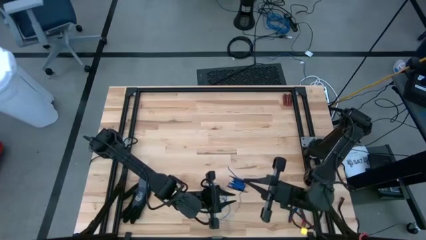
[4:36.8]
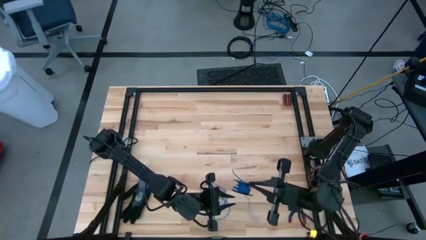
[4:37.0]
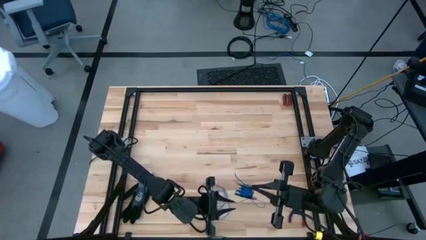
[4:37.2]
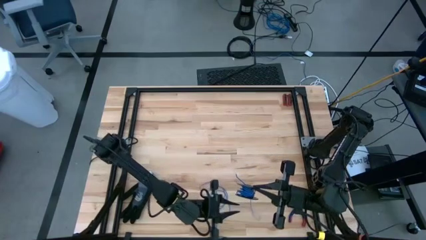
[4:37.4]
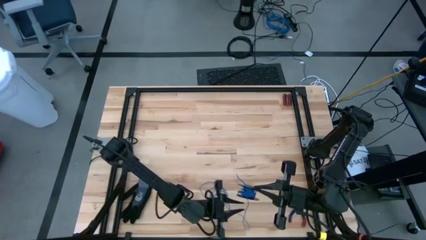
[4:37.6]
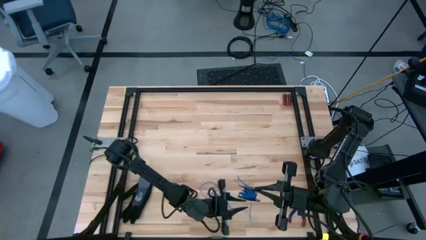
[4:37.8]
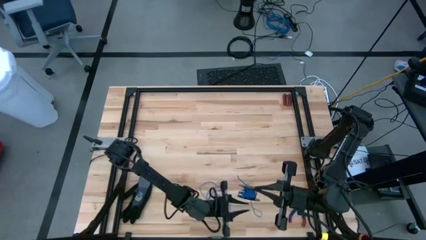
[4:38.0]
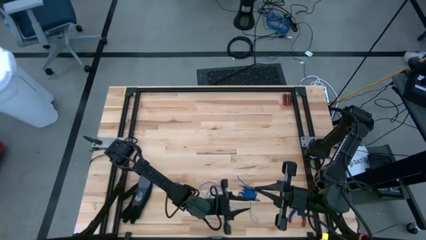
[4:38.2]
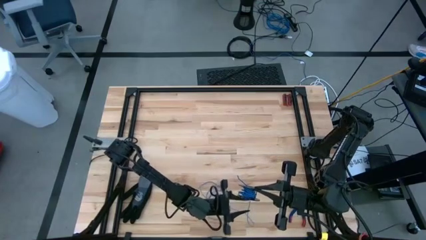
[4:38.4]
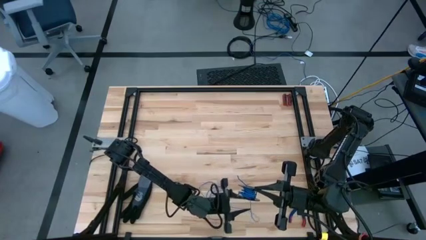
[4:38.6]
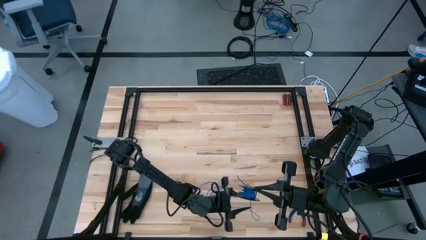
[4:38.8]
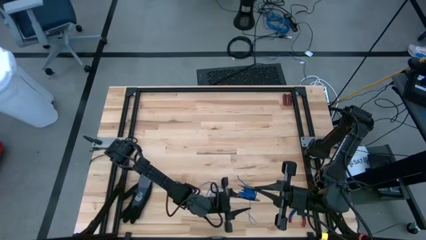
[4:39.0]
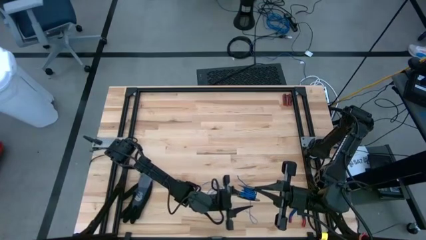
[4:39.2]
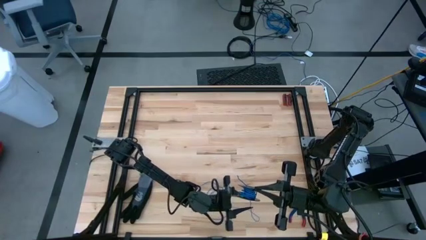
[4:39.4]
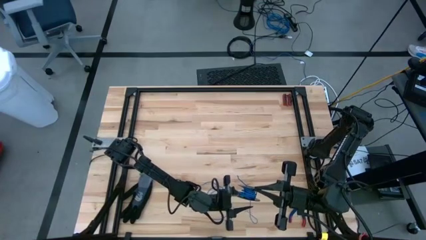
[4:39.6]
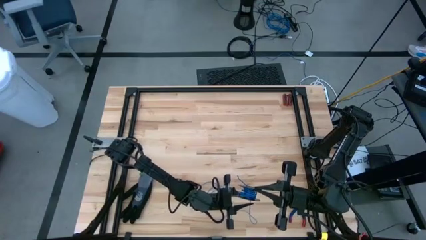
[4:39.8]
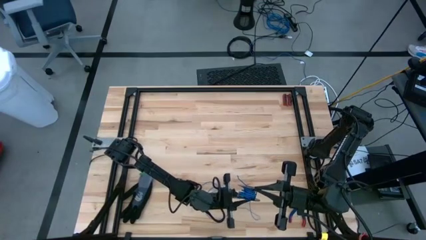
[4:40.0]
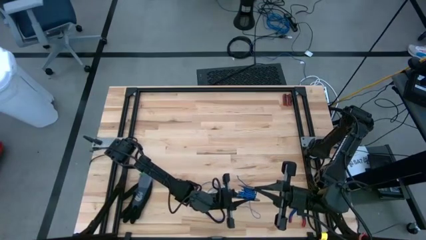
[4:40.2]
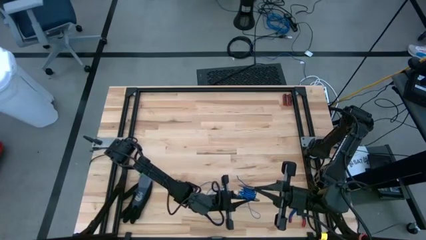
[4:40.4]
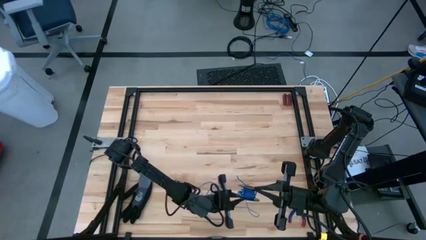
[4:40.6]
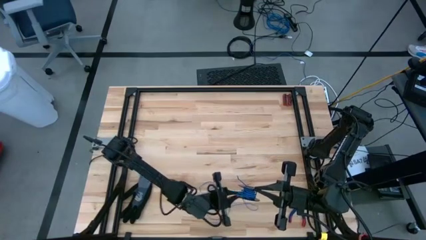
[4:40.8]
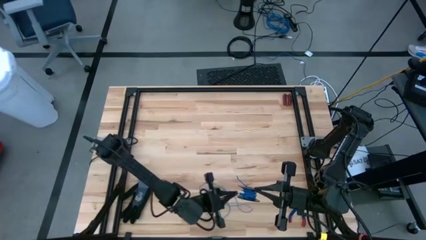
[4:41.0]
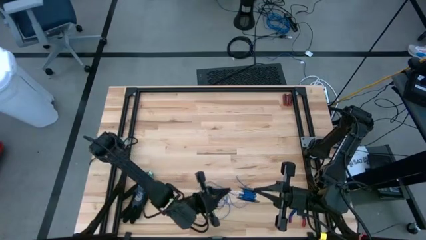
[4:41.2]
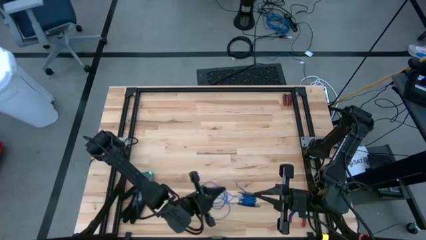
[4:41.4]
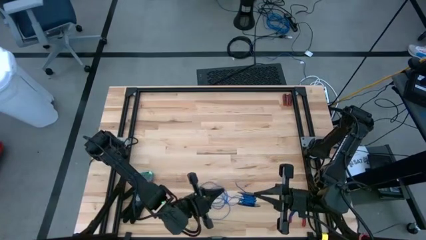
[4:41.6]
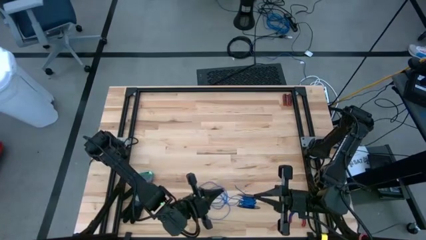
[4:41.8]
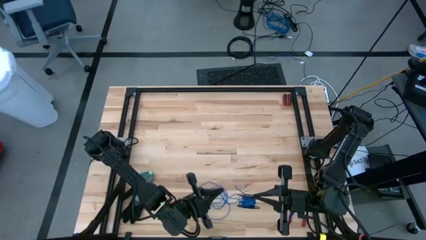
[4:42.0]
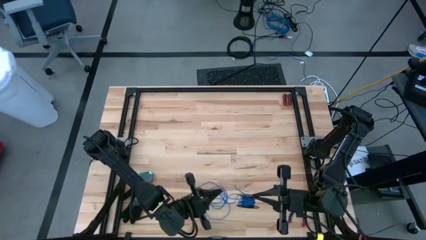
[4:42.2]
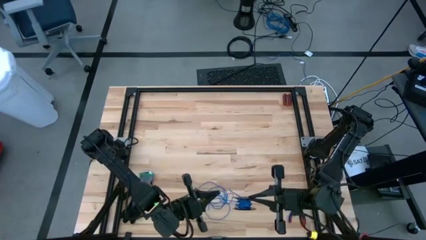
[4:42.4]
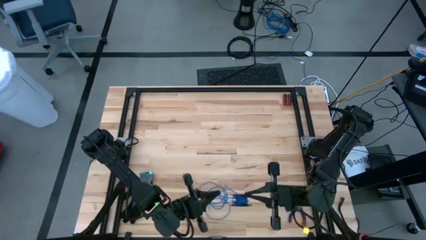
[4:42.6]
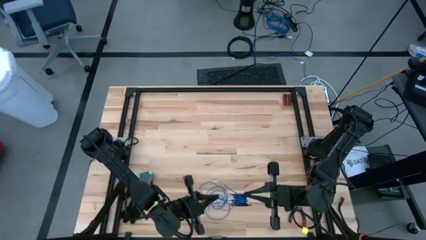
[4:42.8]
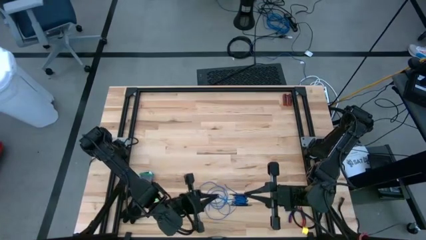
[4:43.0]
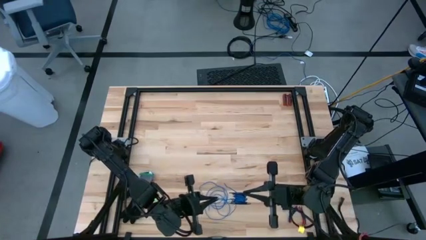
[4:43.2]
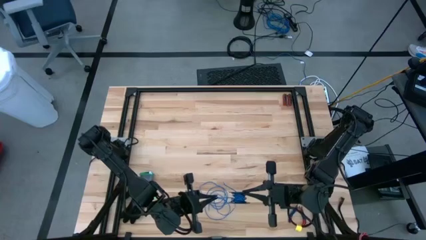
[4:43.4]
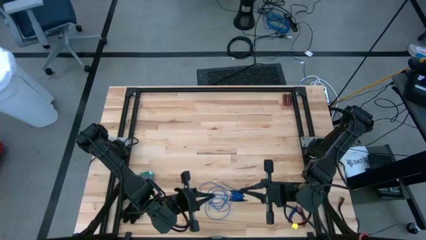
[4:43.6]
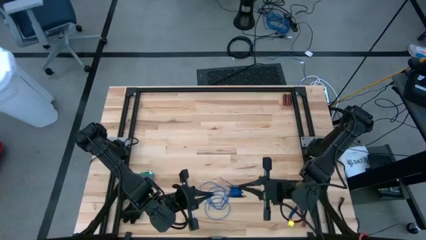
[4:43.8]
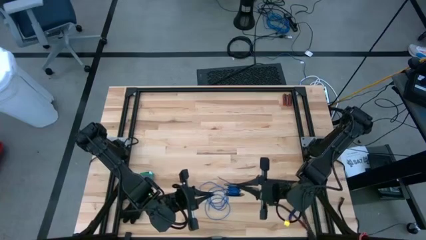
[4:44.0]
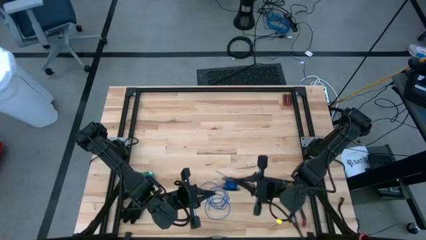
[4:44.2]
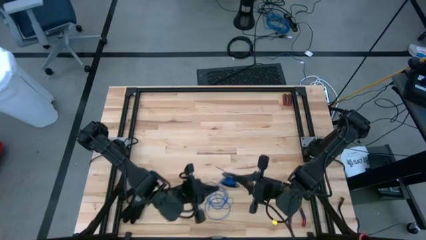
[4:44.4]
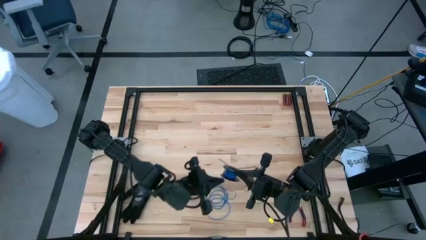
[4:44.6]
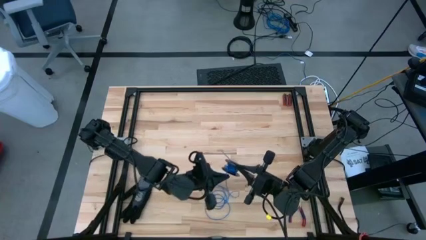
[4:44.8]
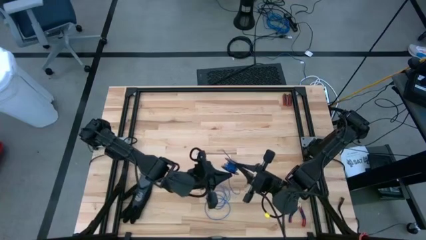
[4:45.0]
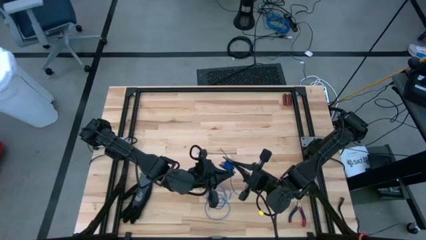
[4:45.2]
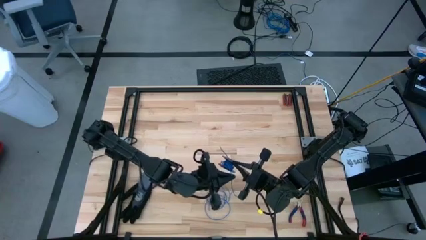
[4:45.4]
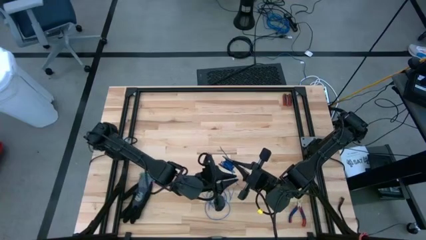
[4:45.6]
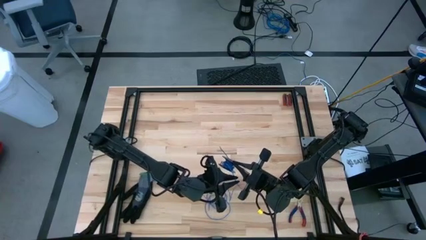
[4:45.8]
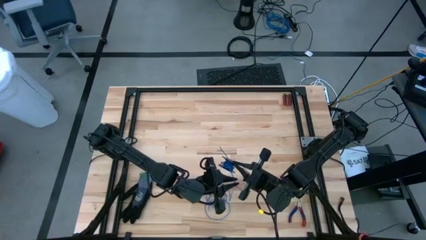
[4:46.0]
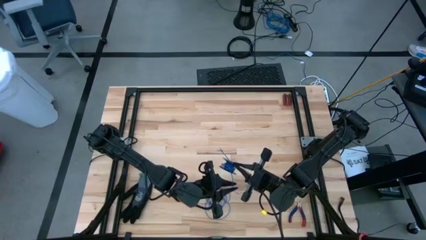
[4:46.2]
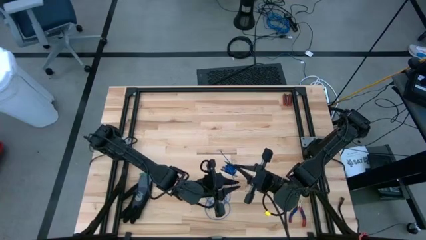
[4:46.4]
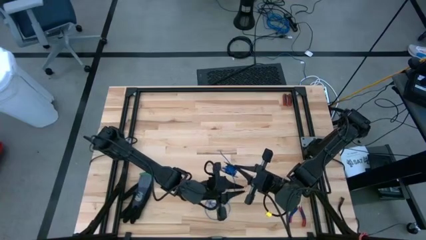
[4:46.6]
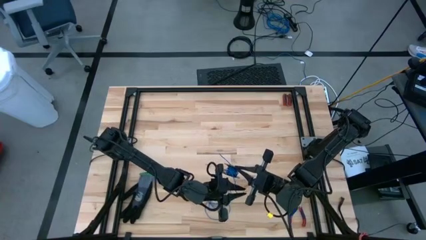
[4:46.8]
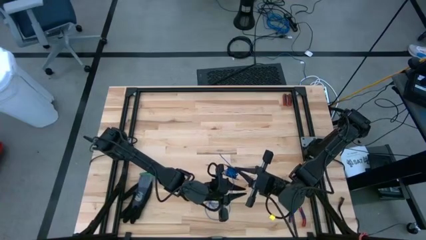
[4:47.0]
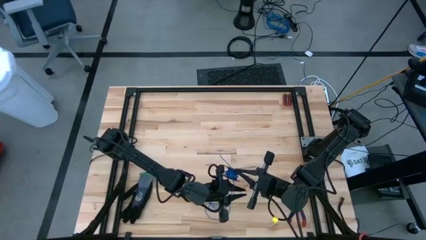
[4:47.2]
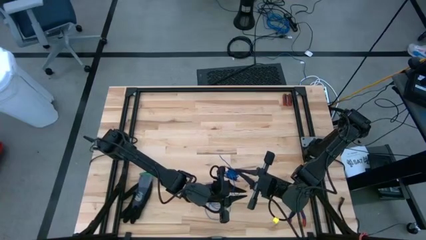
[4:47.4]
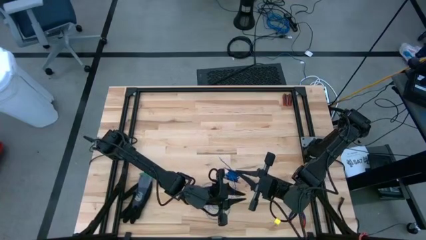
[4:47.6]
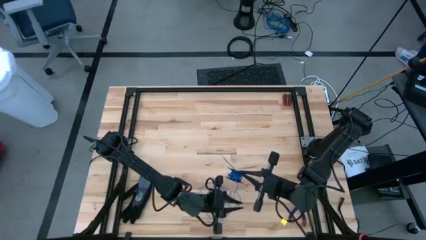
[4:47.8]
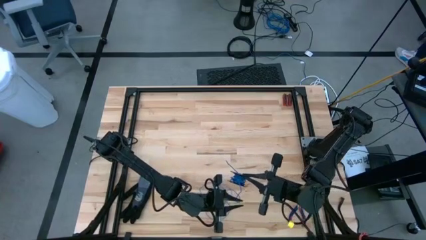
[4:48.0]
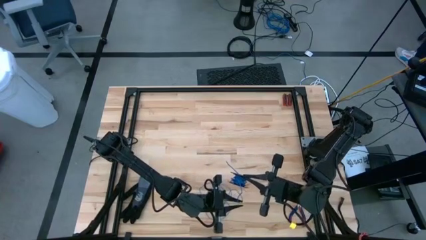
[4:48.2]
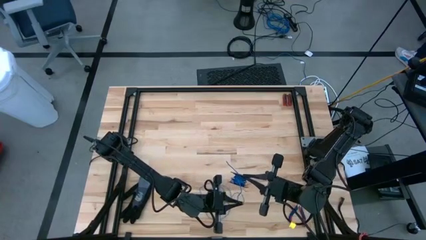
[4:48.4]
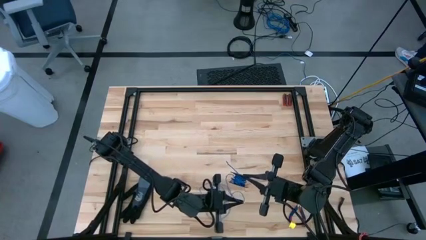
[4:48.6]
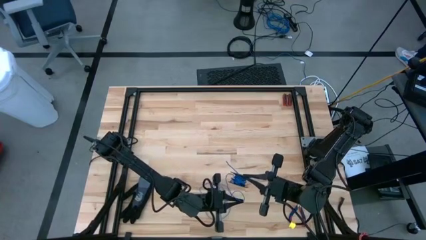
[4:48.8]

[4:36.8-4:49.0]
Task: Coil cords
Coil the blue wire onto the spool

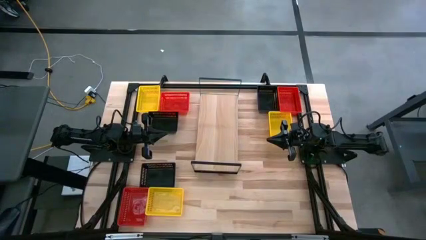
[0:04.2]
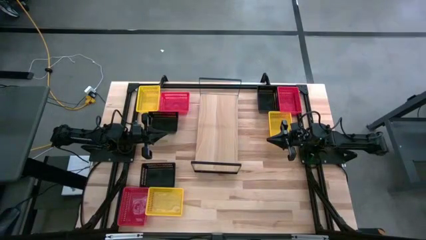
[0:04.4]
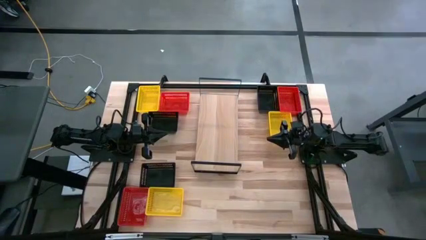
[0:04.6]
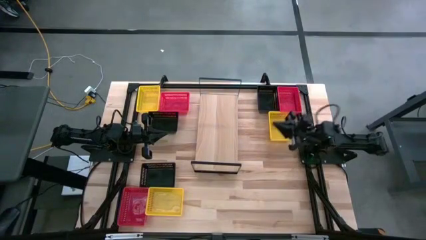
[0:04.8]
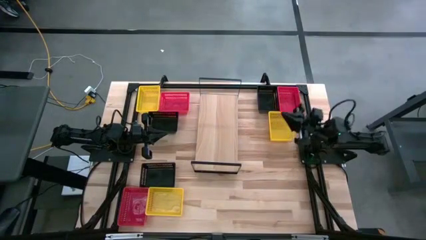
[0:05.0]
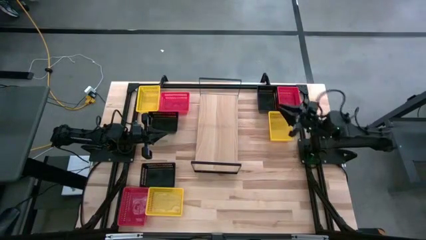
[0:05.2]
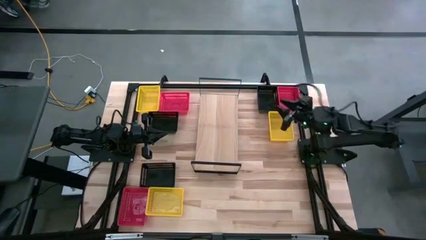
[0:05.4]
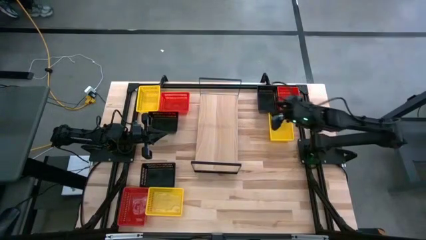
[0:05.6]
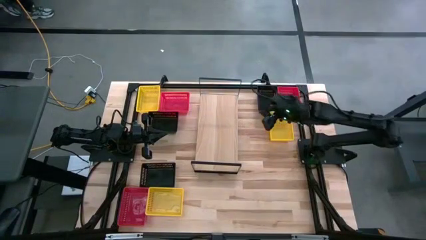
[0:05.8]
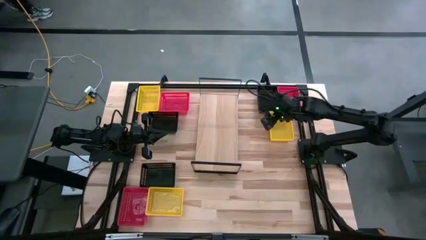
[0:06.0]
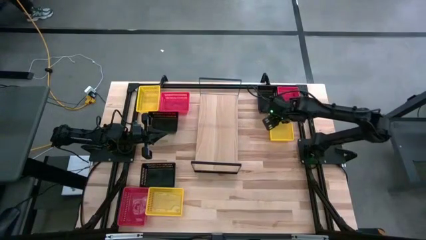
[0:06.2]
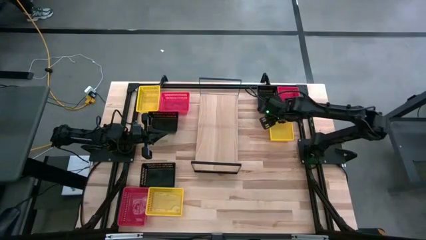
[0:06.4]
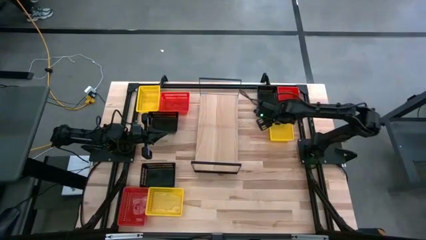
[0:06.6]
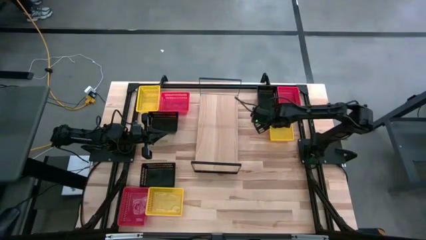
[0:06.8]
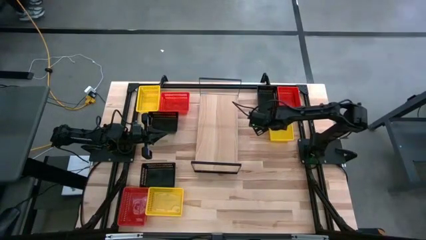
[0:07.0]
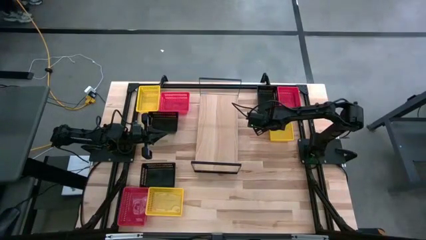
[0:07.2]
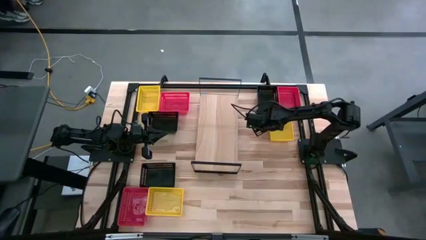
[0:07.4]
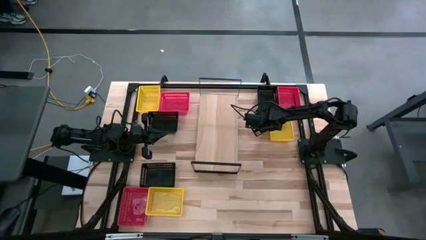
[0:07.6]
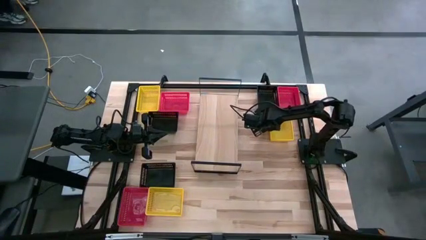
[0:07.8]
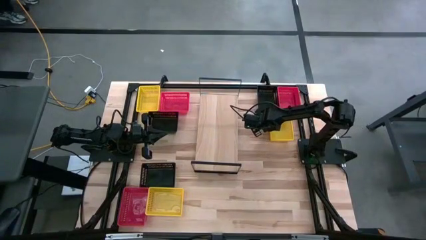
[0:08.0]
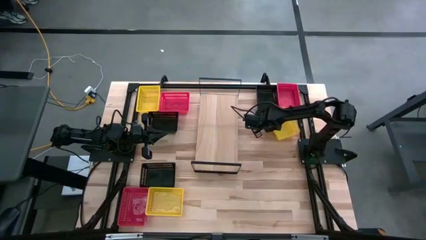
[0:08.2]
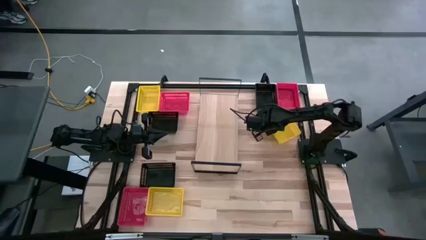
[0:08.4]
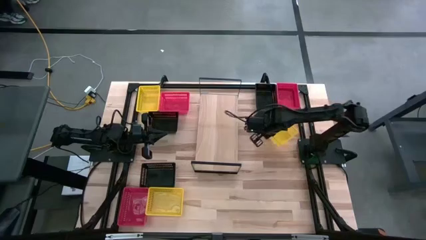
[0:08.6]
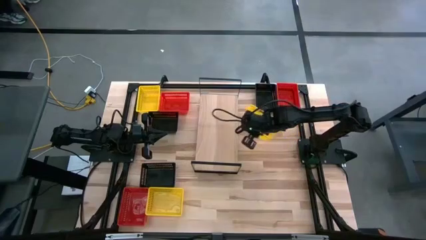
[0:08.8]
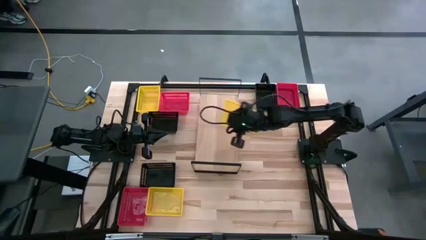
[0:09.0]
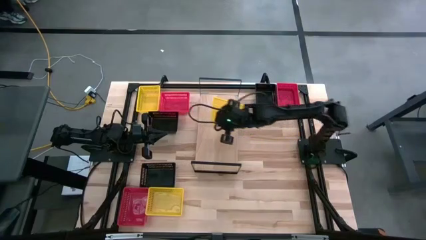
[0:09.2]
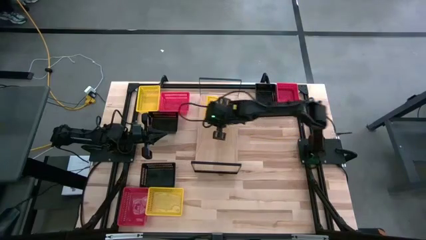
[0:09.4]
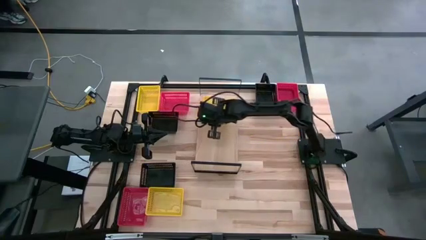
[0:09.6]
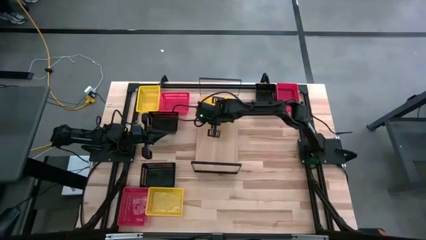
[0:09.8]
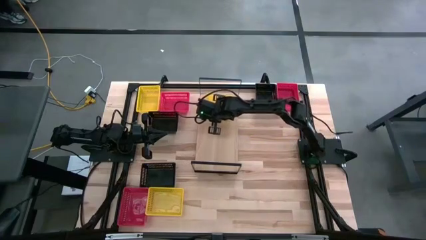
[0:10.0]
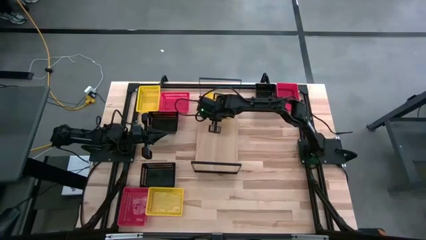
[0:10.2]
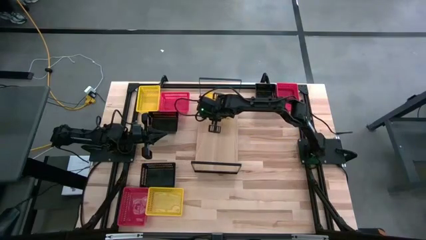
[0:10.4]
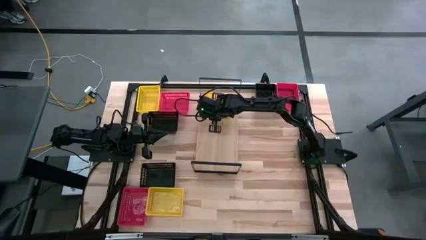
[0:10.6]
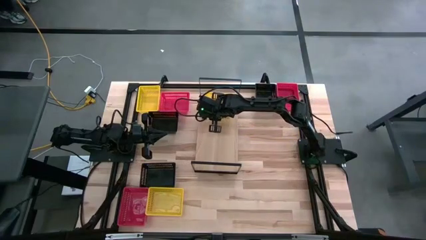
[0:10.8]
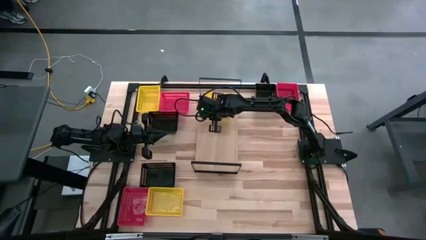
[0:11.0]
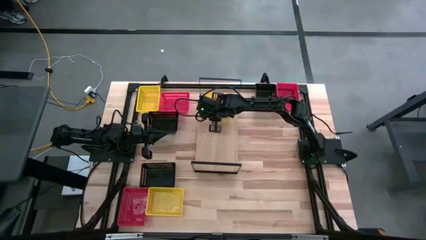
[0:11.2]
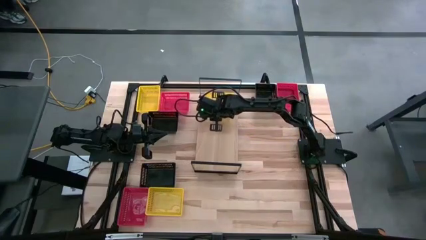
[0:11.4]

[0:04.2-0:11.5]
Task: Stack baskets on shelf by color
Put the top right yellow bin on the shelf
